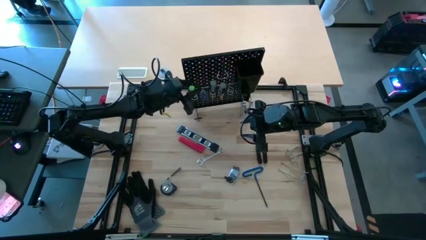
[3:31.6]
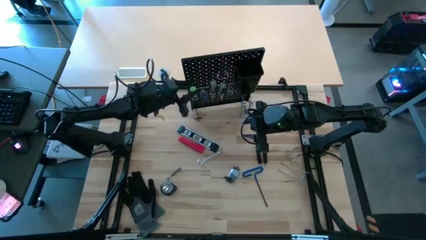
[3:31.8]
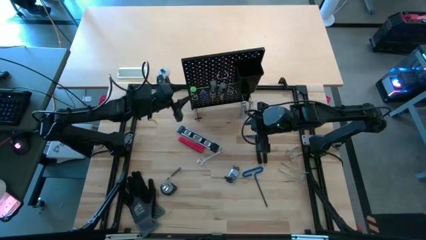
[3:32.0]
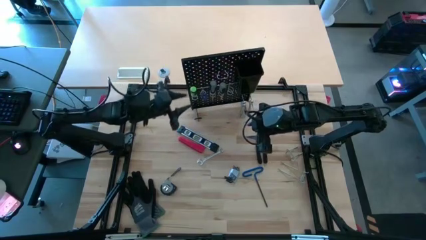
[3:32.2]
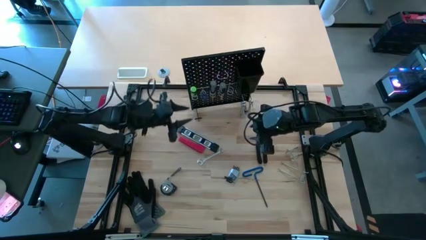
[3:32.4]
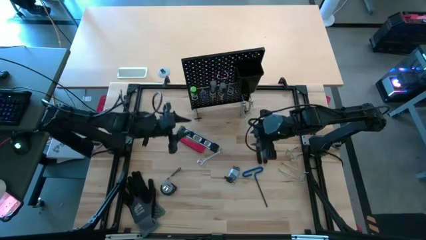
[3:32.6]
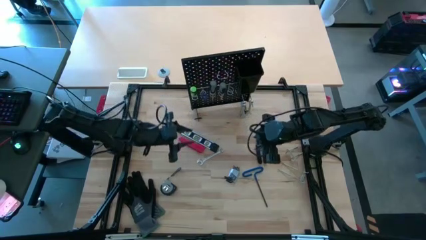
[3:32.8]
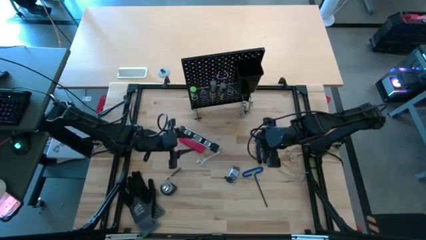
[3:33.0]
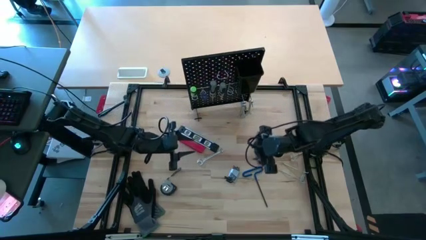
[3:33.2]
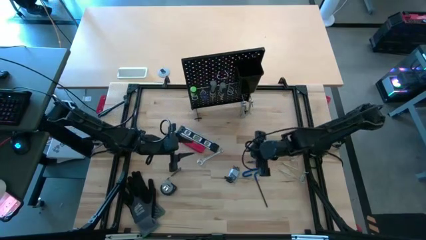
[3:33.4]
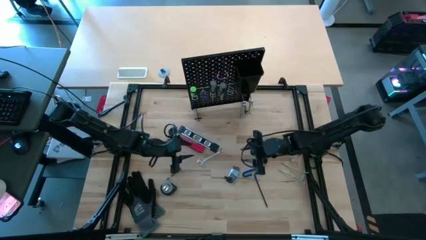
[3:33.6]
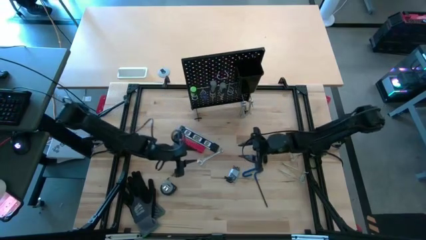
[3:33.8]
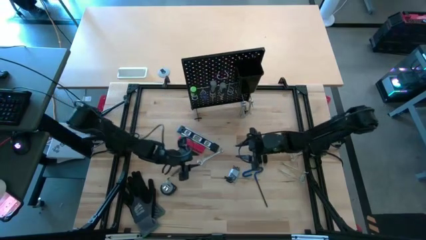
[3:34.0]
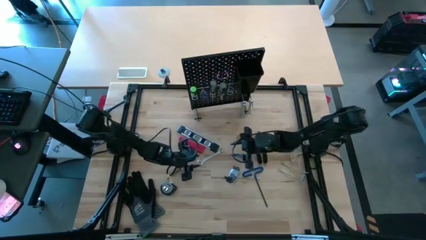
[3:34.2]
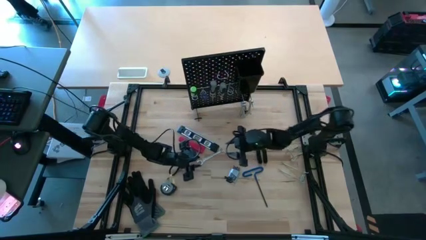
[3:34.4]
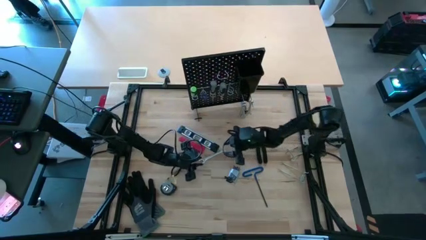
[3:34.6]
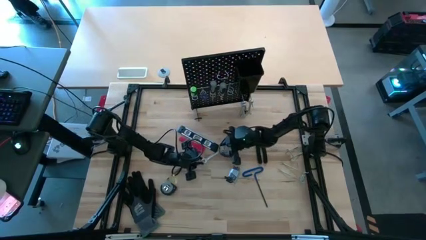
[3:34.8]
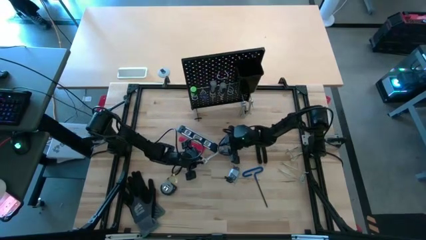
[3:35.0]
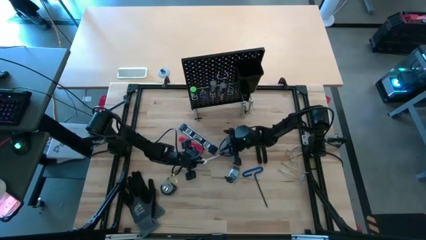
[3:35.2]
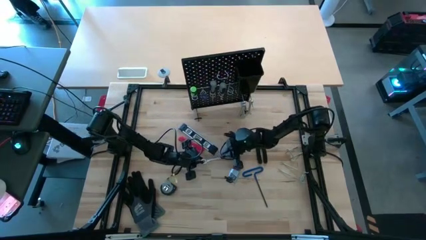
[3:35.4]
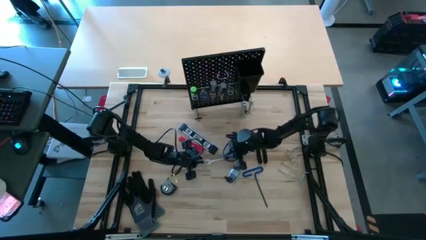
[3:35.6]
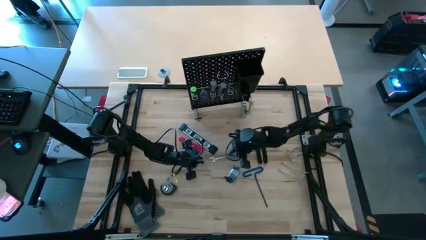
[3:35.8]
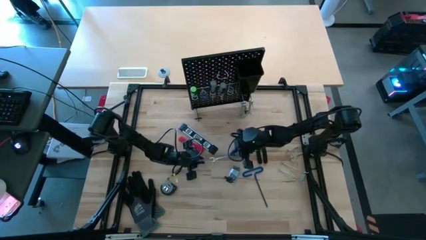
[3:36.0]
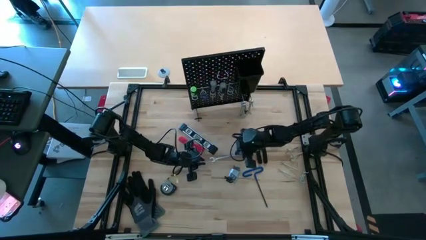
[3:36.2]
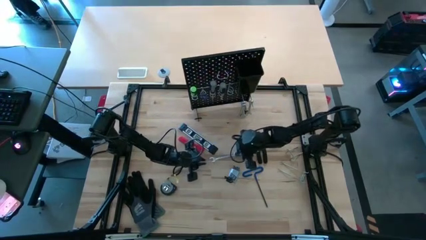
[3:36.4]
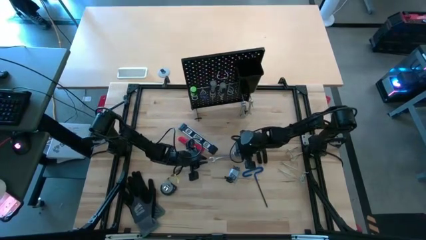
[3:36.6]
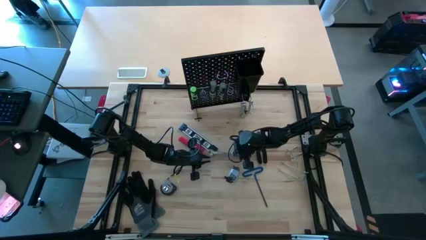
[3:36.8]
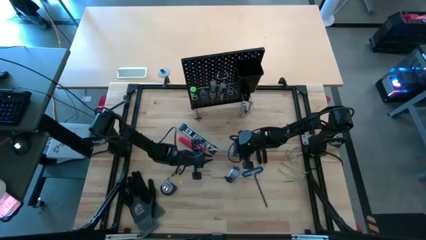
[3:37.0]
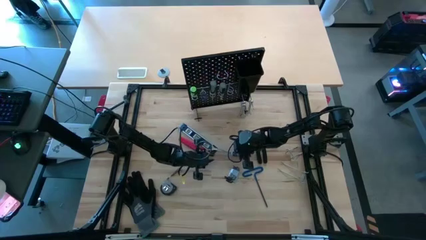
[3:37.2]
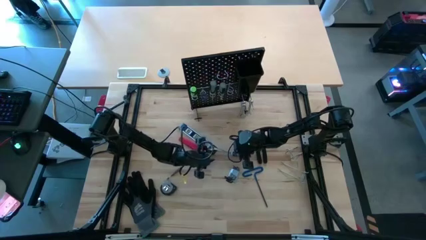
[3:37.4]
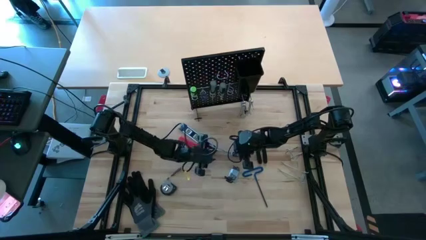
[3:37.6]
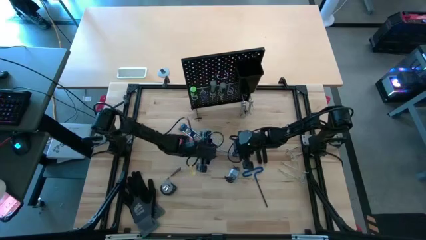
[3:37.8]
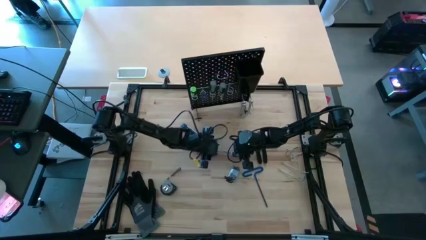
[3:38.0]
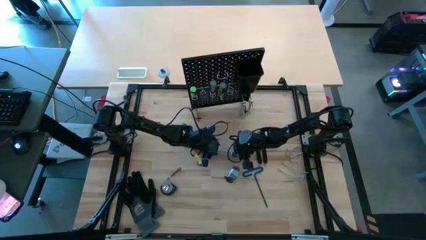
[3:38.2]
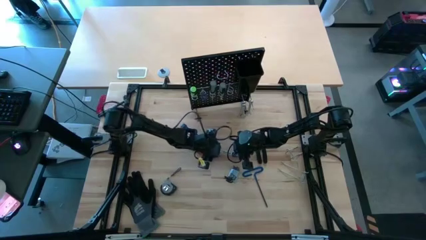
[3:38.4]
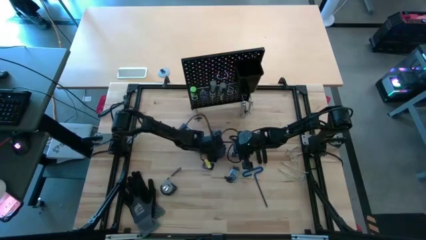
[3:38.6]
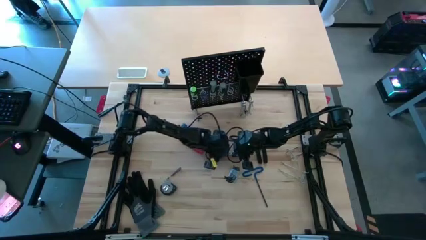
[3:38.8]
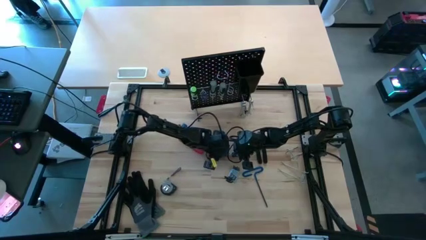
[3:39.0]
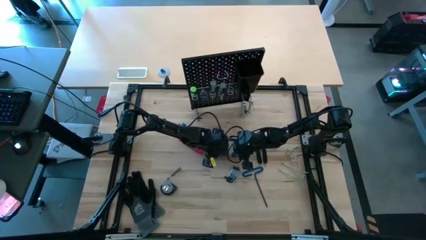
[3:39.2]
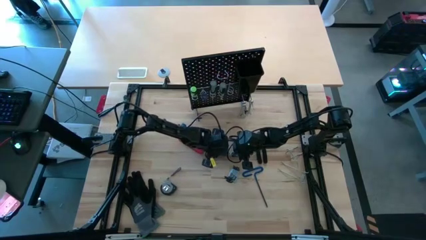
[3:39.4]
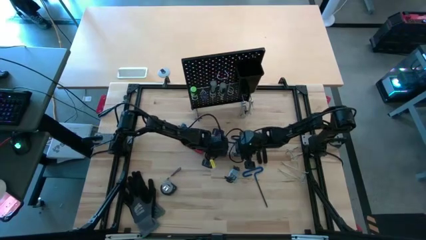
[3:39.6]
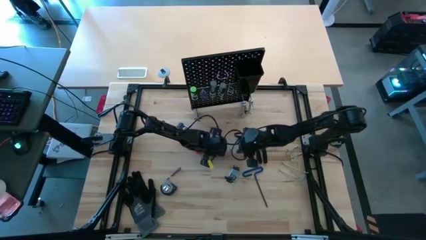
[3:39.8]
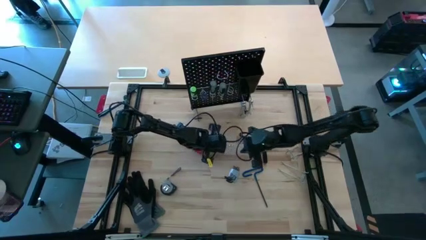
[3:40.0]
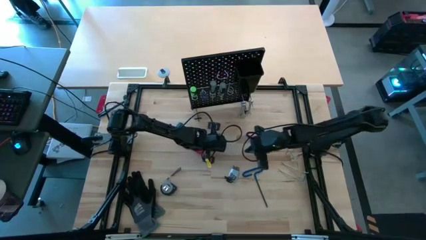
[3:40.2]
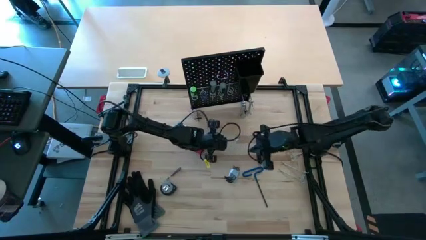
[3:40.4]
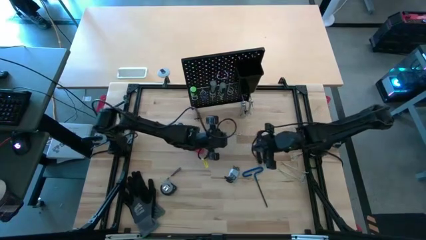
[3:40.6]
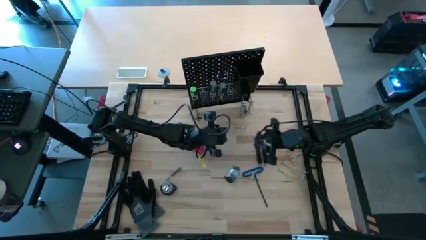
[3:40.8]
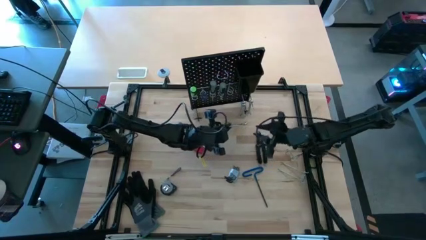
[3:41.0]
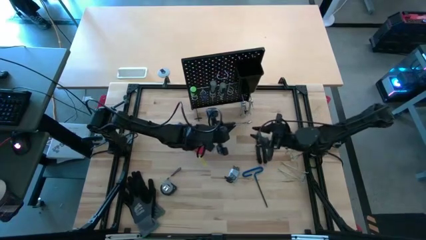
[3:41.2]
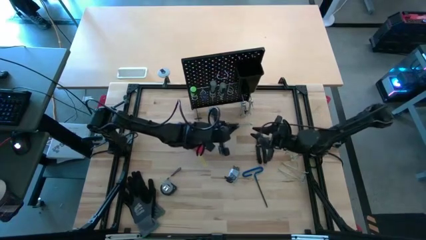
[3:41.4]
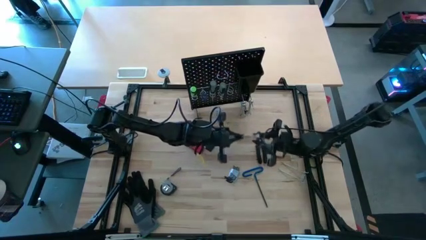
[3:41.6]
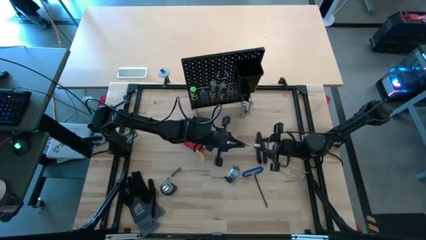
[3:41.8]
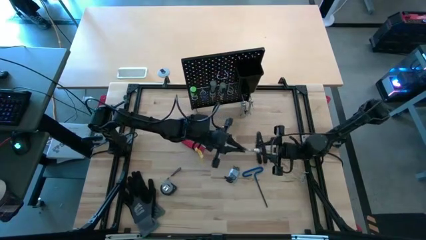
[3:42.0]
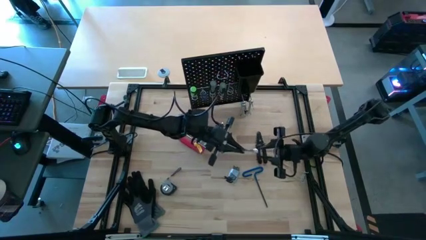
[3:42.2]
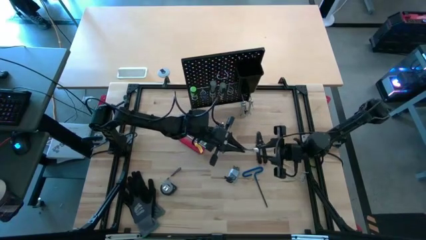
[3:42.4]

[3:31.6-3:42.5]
Task: Hang tools onto peg board
Hang the wrench onto the pegboard

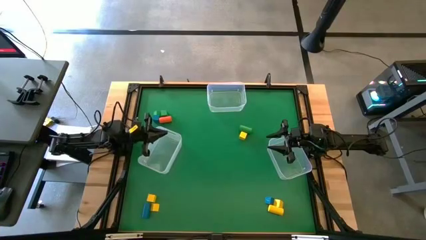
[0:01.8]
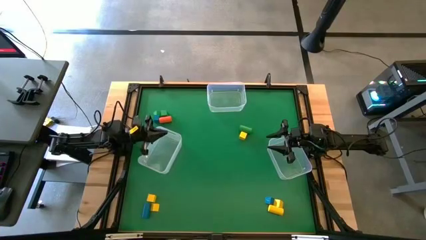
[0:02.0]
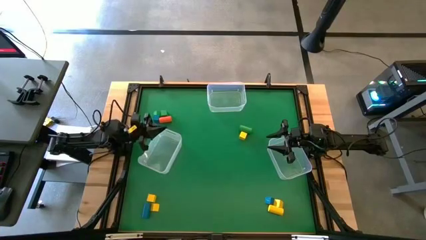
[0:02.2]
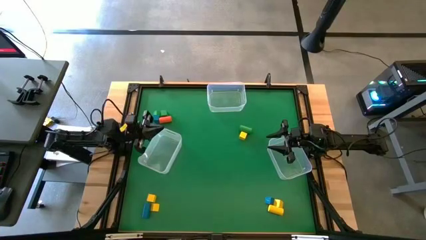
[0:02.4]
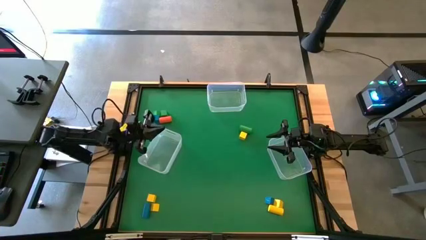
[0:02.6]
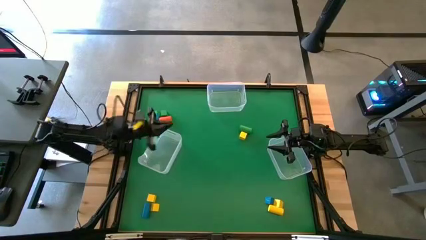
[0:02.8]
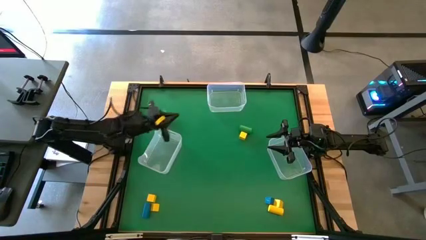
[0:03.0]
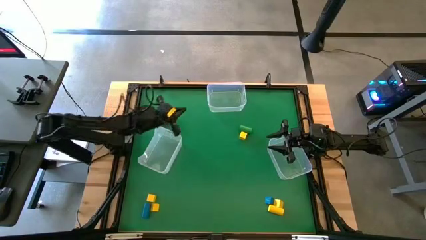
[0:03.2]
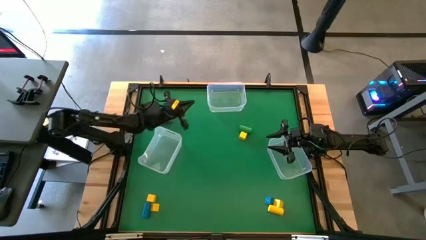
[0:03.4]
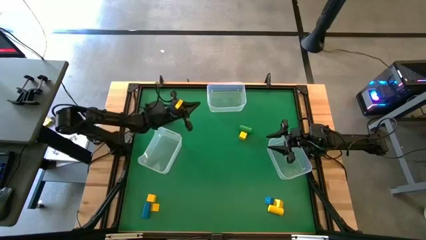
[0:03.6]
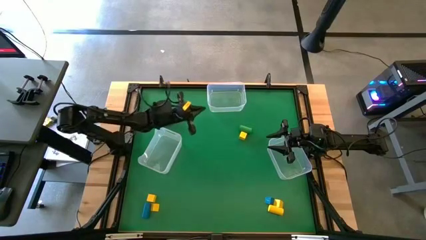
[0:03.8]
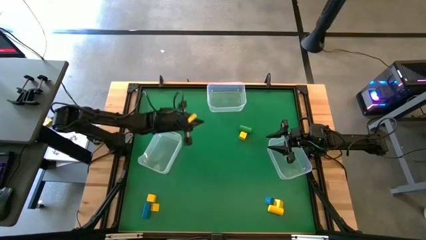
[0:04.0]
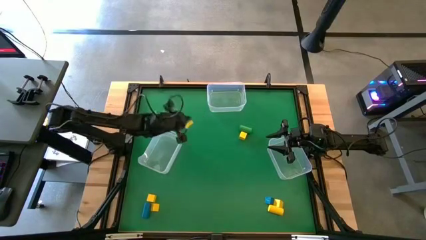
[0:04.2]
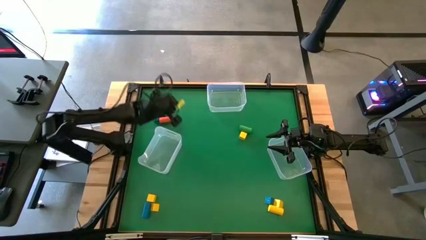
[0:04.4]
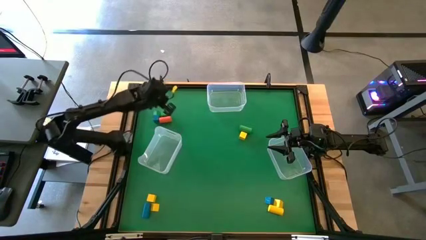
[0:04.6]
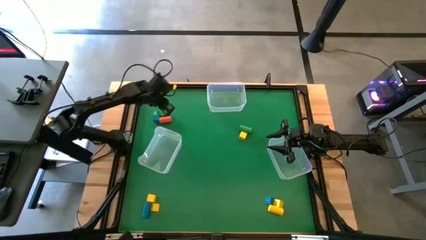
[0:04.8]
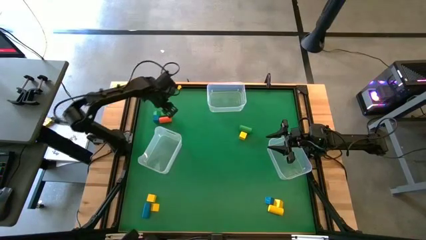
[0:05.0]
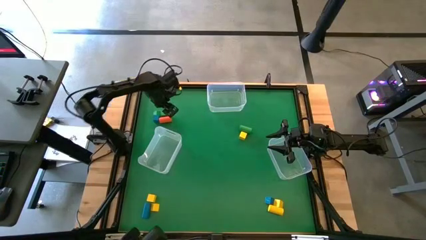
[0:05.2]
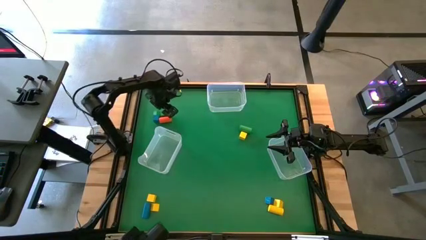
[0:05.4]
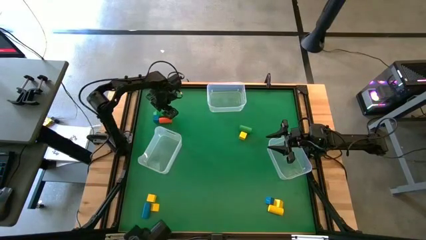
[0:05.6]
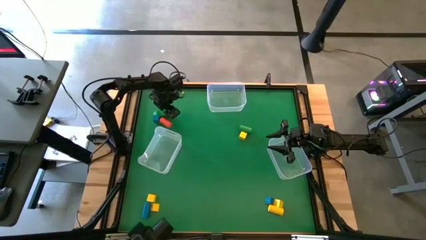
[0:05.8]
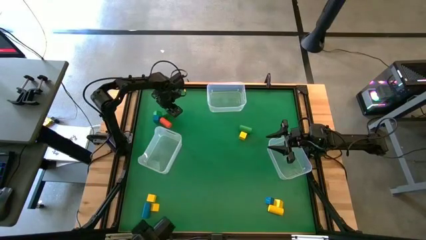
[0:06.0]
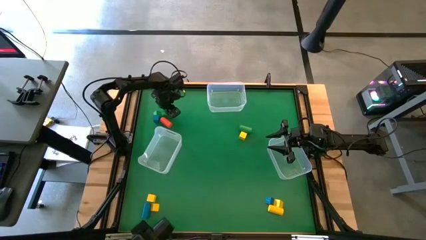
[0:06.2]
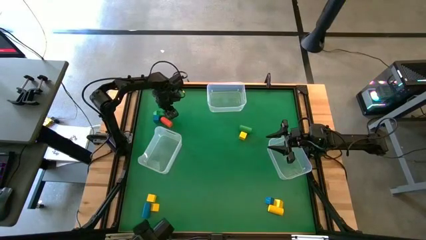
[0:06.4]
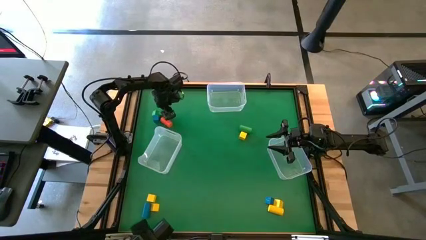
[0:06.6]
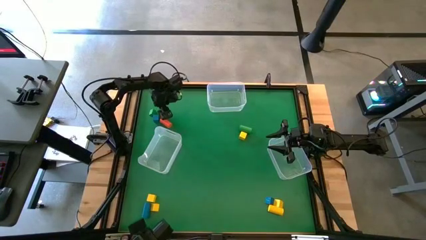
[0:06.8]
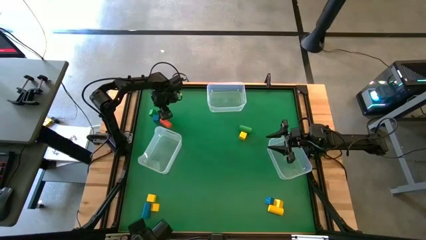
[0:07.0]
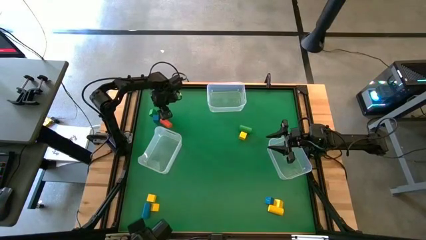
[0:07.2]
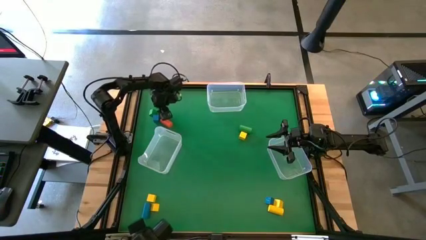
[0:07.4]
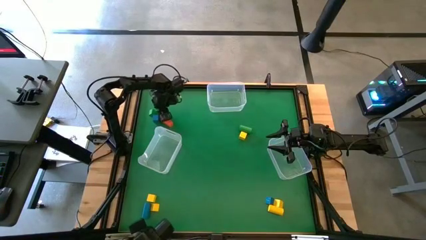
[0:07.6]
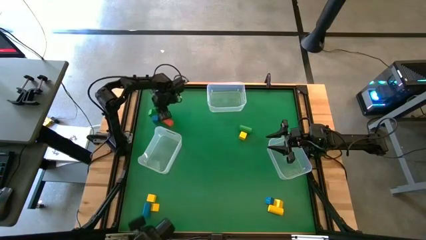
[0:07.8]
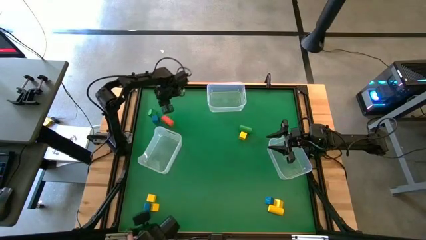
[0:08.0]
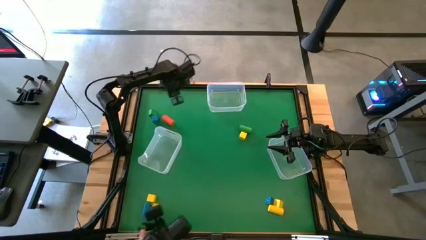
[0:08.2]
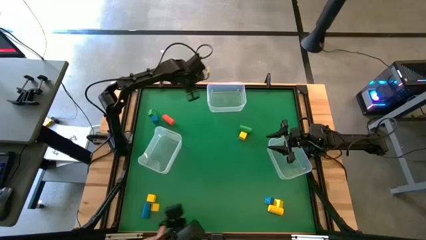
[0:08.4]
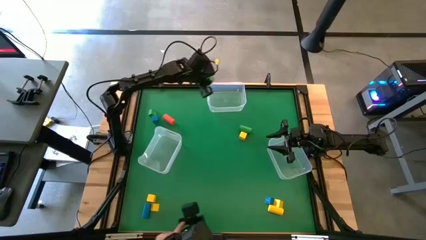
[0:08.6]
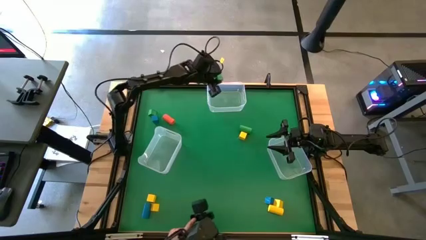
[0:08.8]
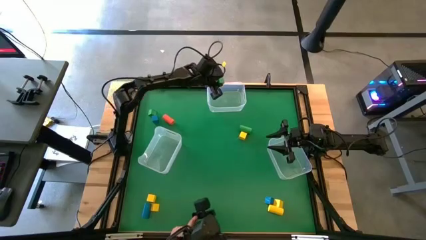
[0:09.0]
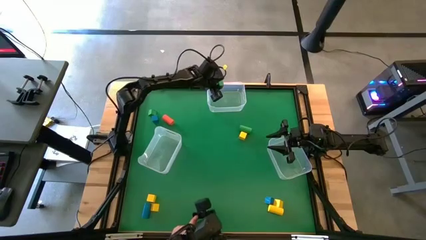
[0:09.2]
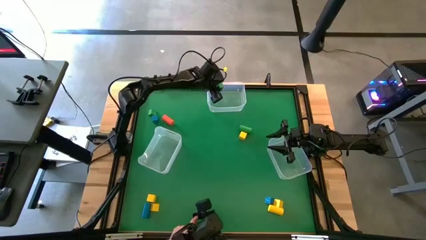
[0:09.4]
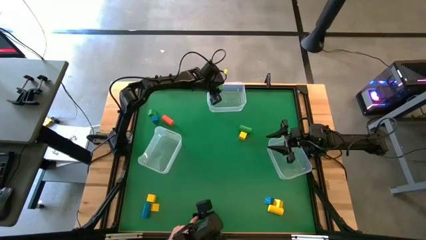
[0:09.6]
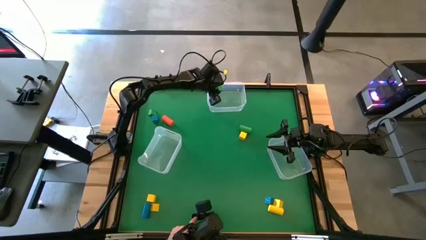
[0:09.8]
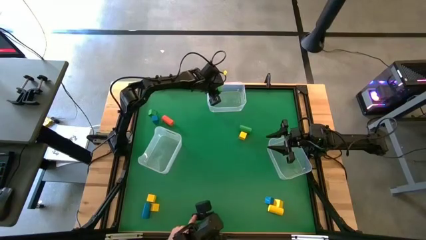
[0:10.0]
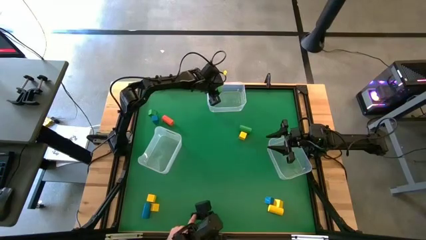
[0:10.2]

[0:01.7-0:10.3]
Task: Sort blocks by size
Put the green cube block into the top transparent bin
